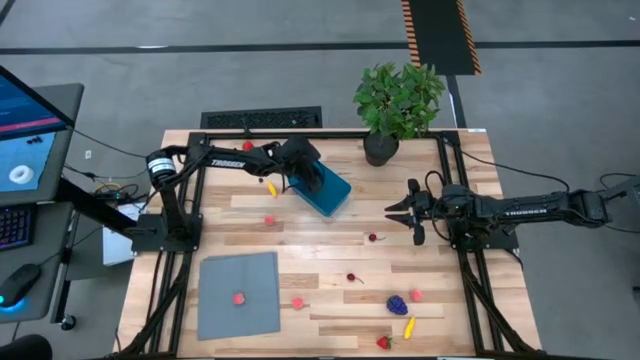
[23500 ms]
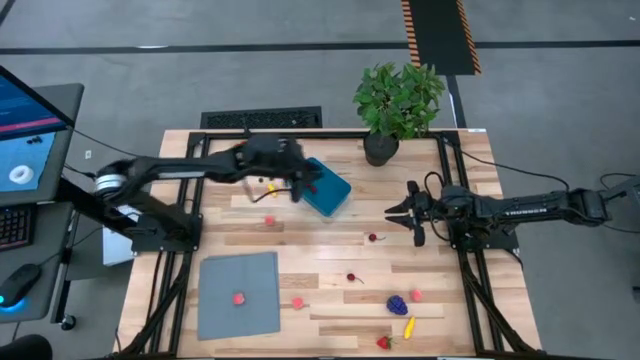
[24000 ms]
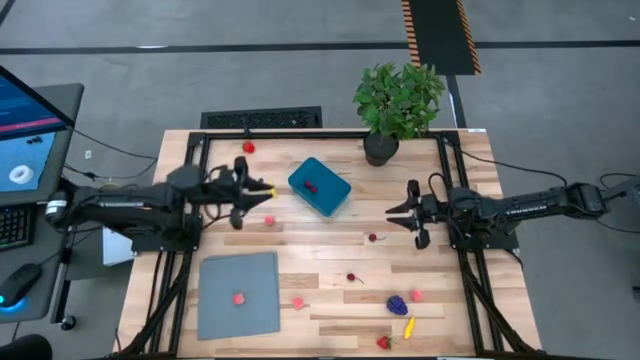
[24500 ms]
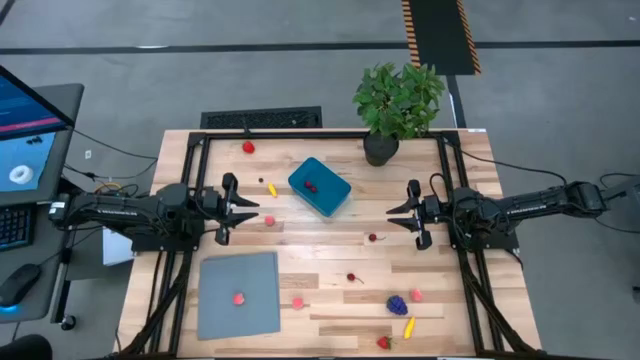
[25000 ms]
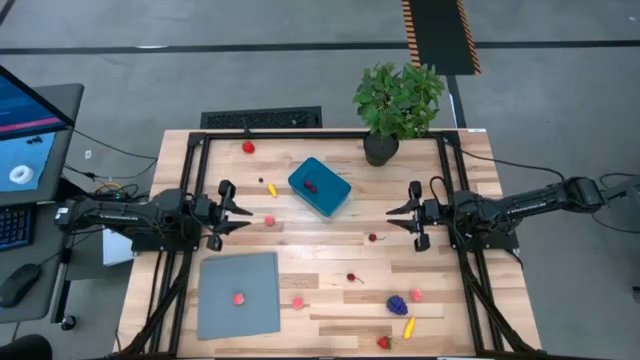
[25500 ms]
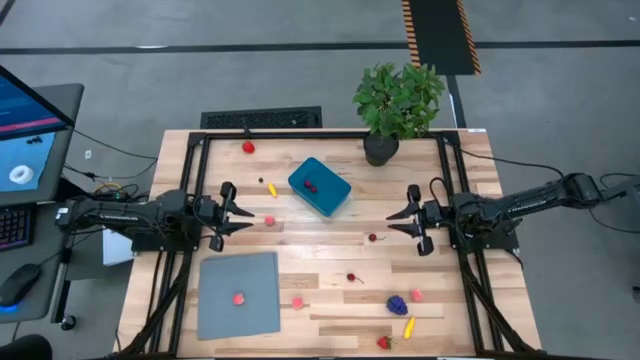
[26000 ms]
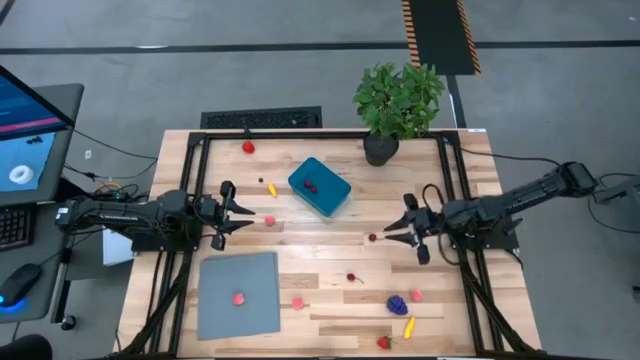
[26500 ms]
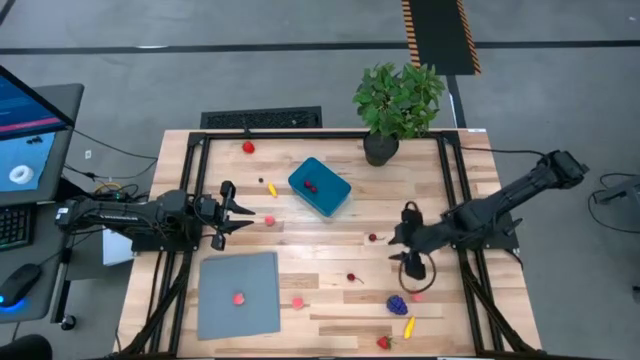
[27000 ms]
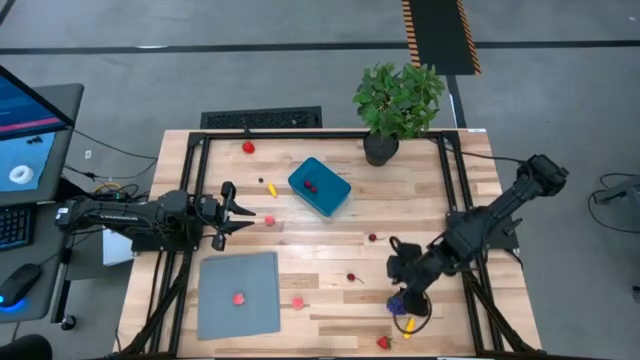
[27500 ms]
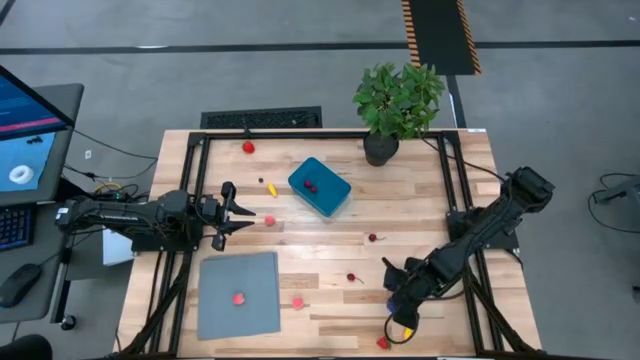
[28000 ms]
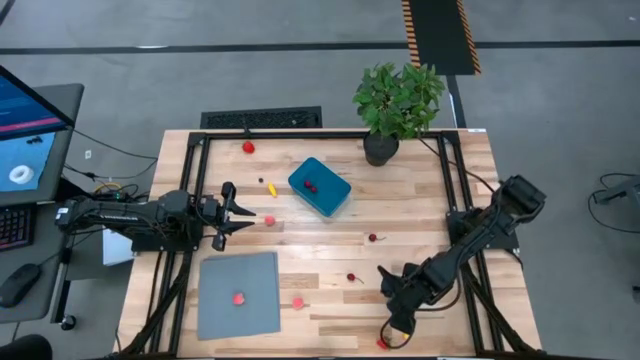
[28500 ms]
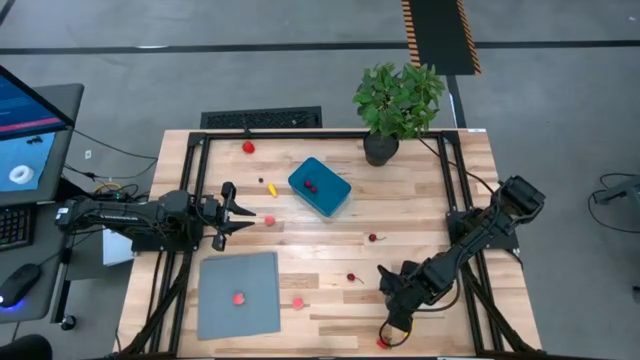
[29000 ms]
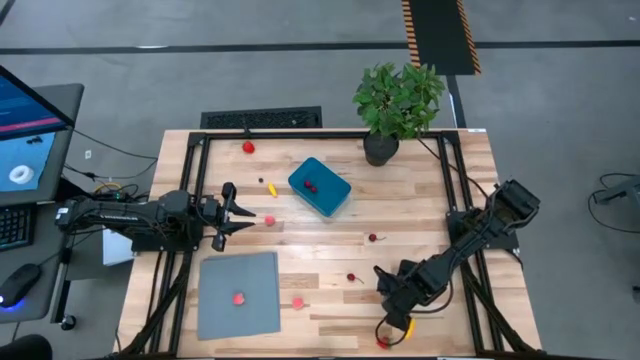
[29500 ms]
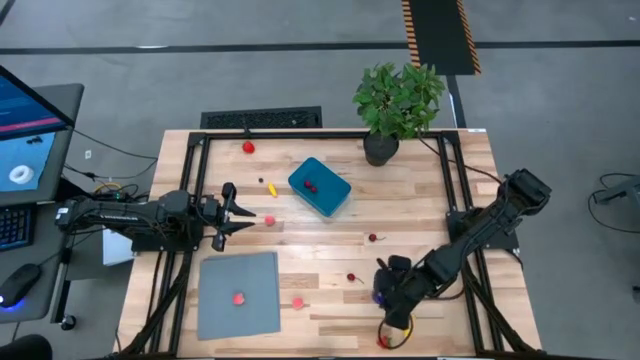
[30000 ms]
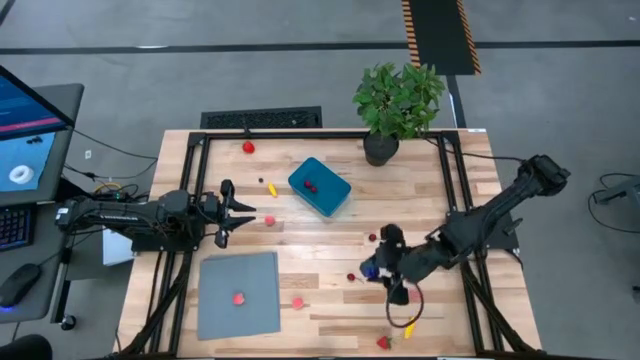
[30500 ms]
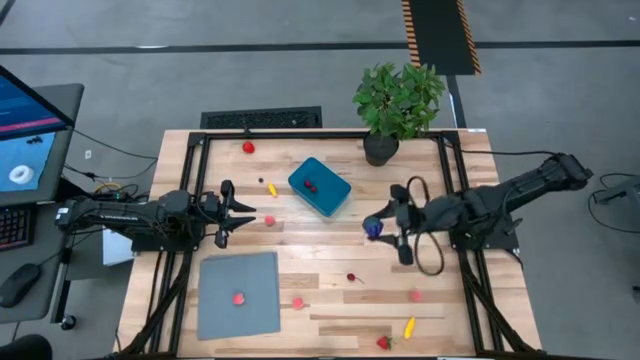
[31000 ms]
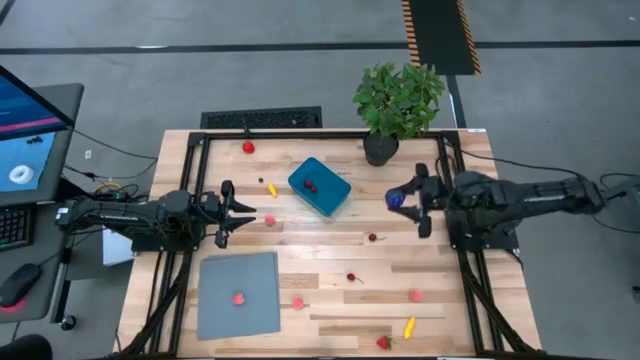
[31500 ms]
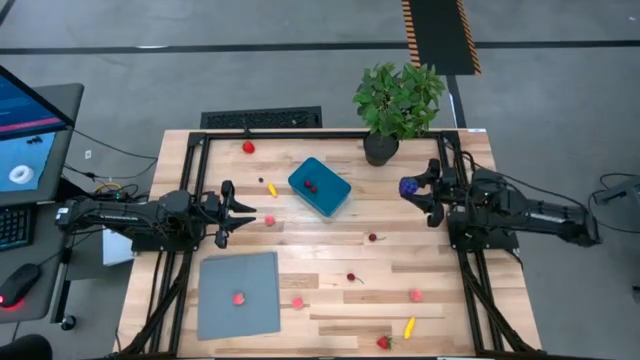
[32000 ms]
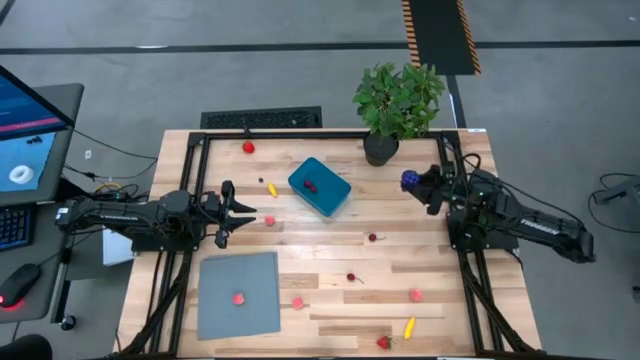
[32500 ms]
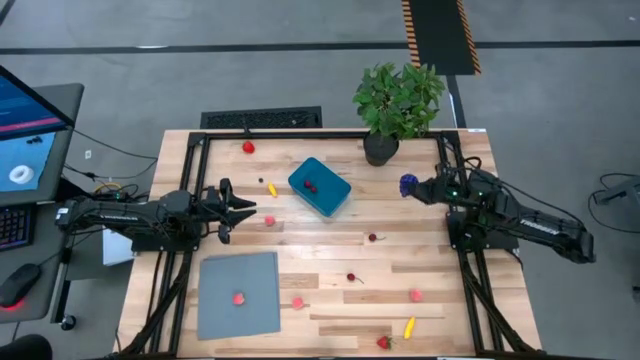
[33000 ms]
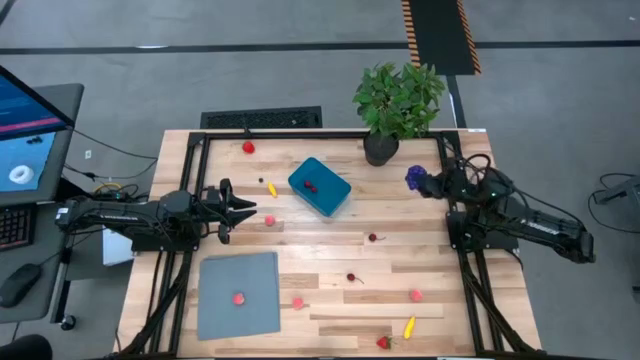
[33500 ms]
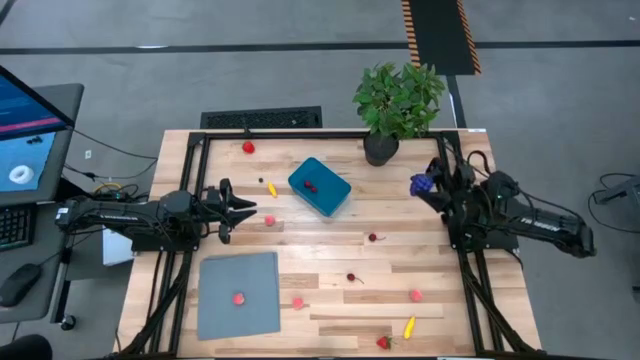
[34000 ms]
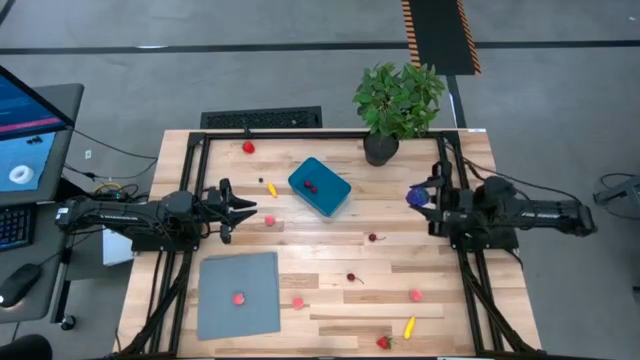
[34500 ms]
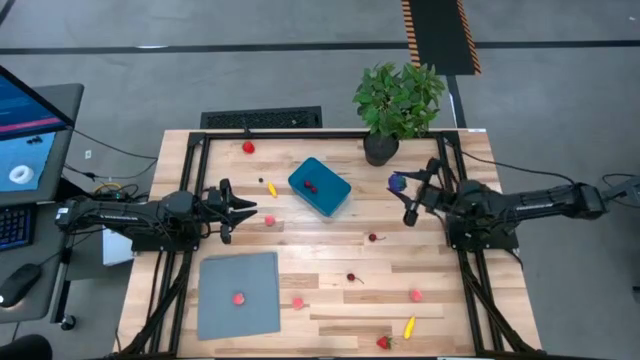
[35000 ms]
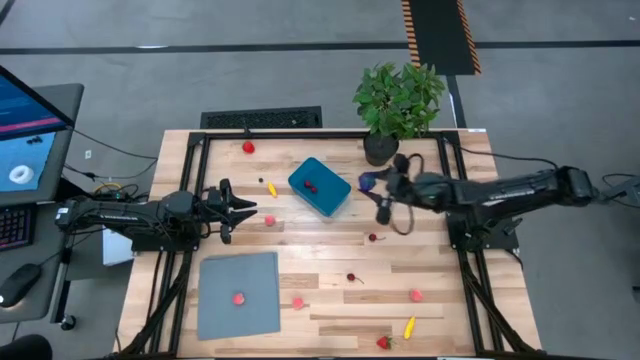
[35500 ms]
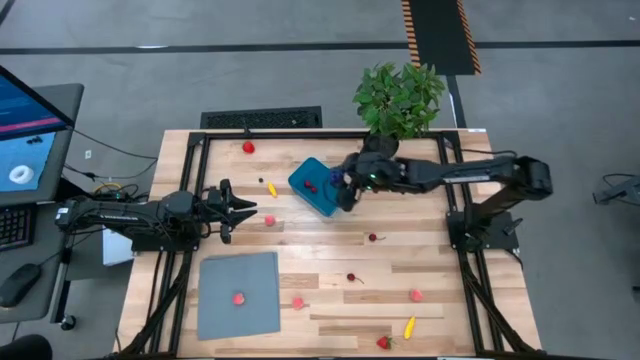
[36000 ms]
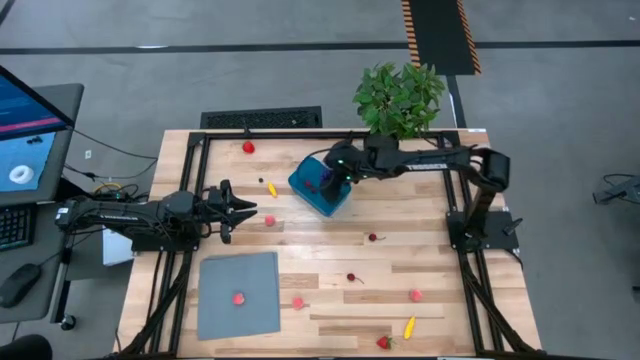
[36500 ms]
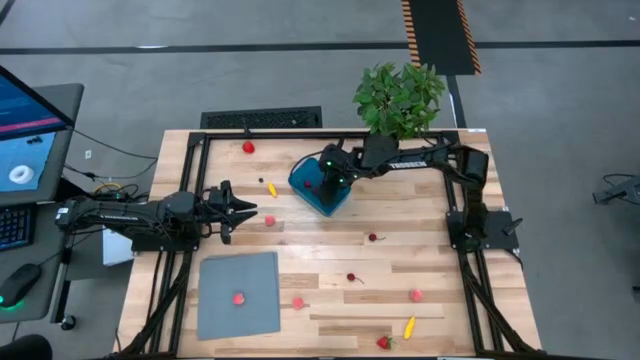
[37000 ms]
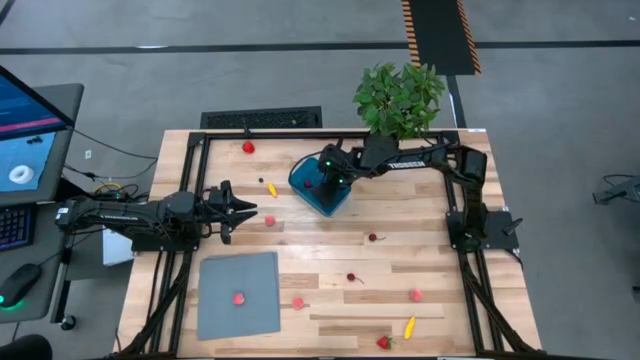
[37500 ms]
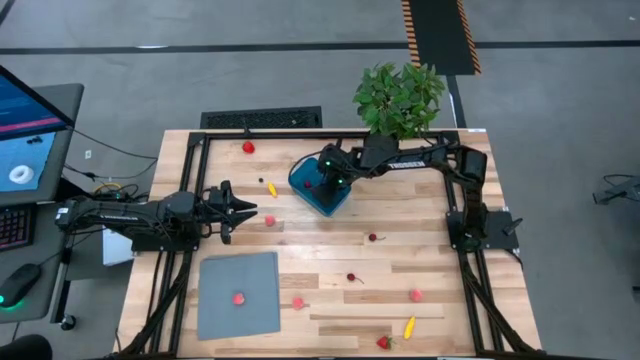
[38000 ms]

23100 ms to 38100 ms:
Task: Pick and placing Produce into tupperware
Put the grapes into the container

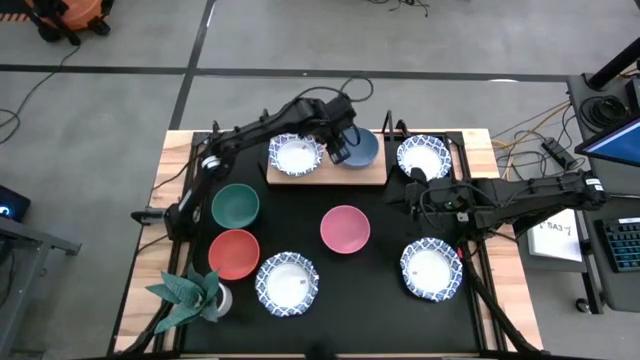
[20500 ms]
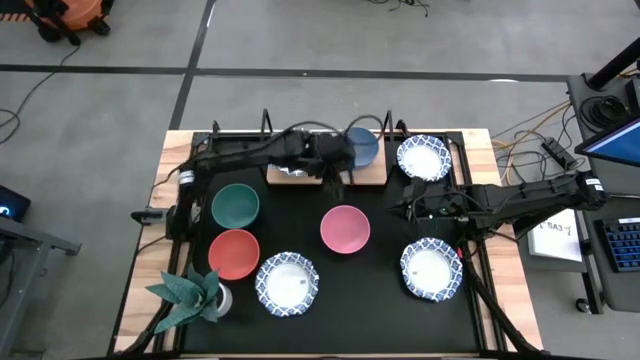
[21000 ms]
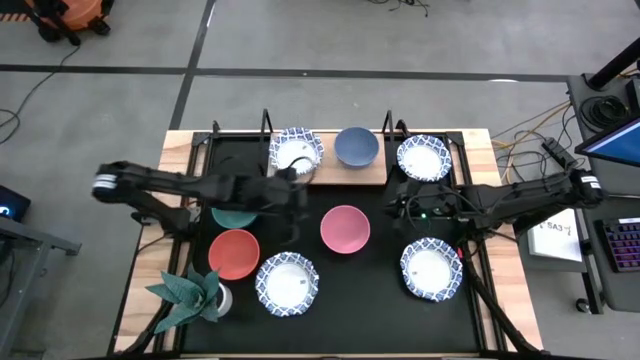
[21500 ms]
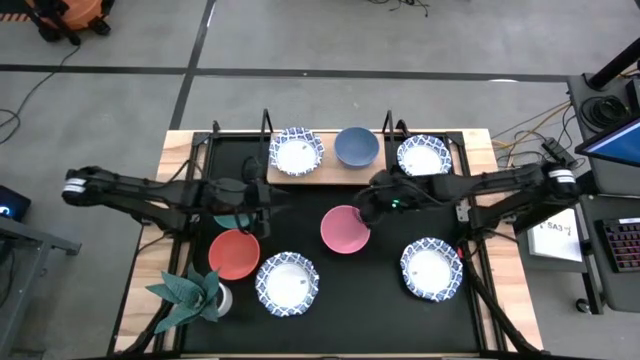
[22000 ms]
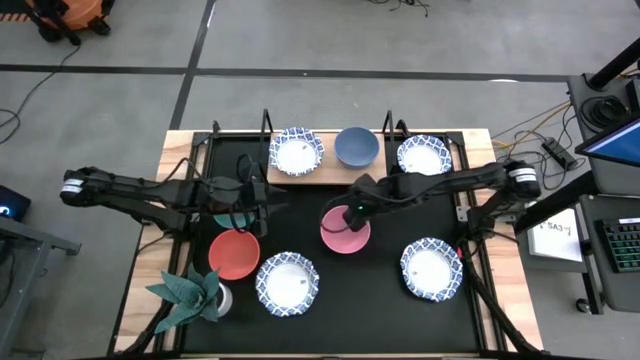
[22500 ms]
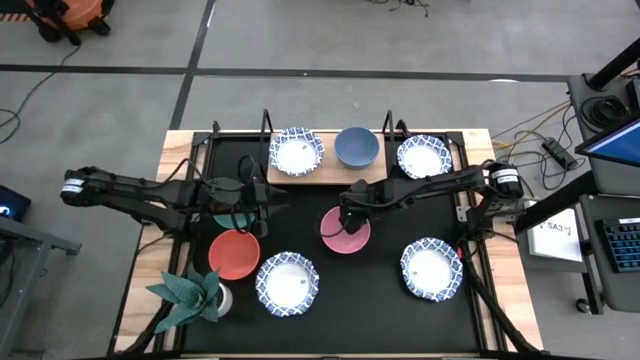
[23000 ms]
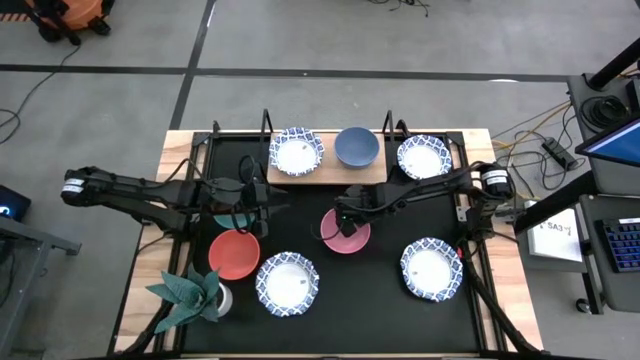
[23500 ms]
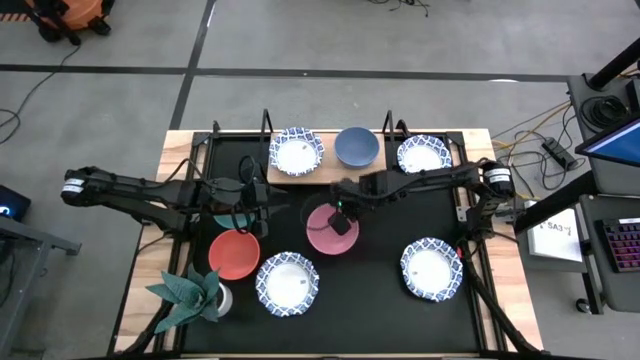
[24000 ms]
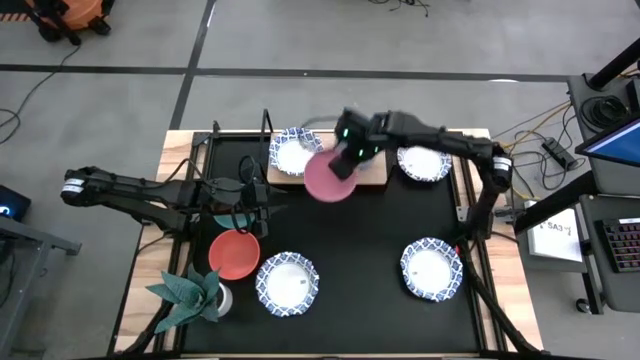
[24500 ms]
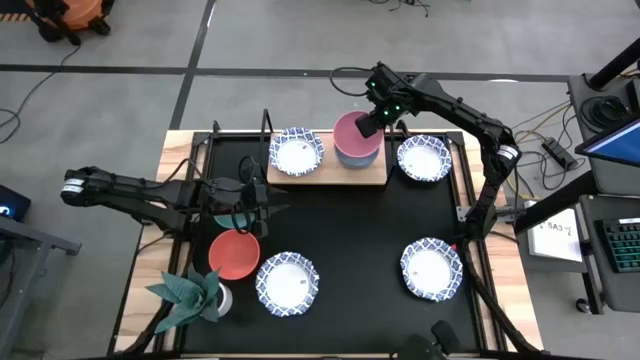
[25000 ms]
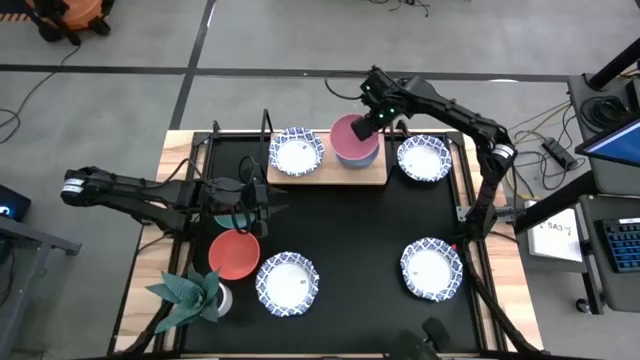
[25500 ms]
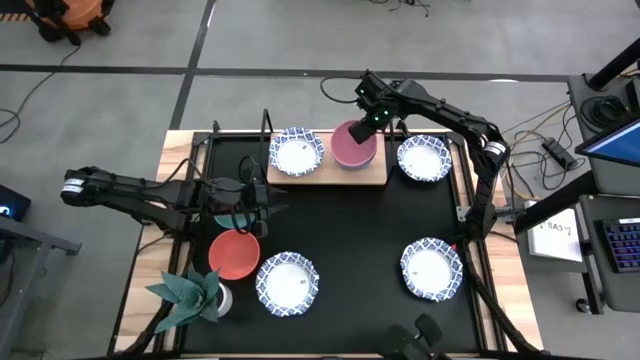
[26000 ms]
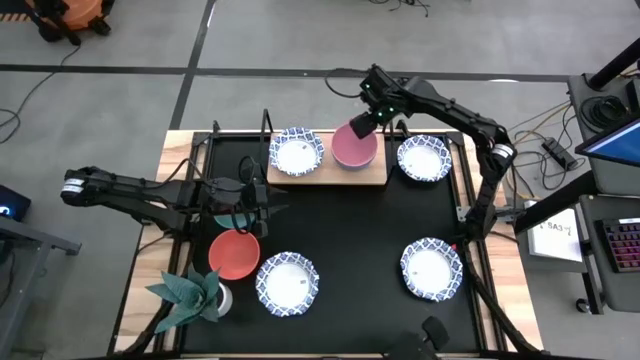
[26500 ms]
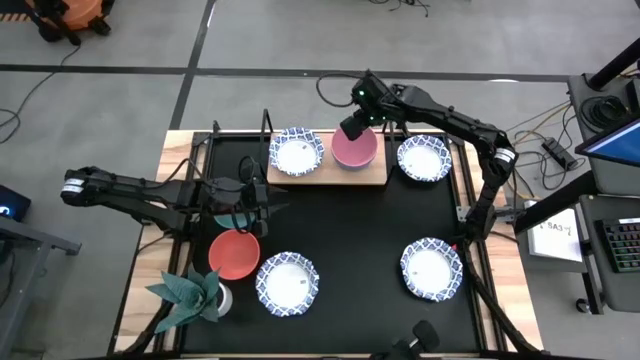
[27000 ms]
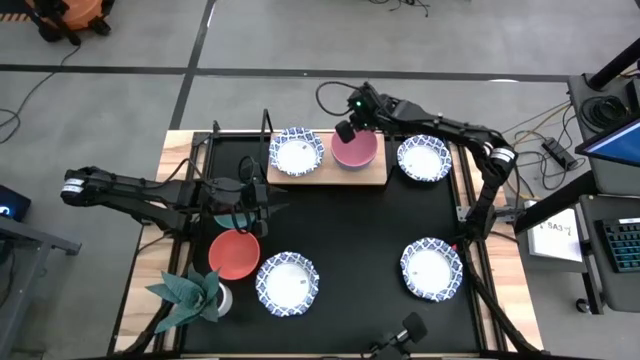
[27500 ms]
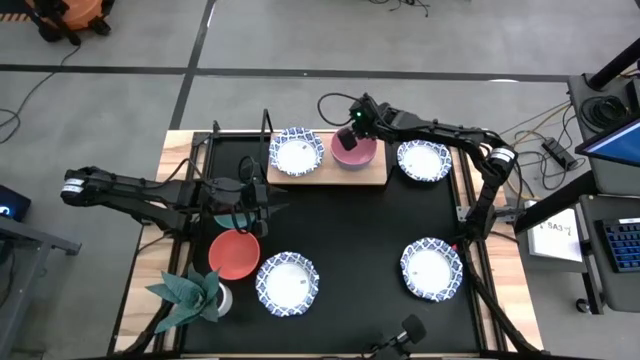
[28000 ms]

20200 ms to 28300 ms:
Task: Place and stack bowls onto a shelf
Stack the pink bowl on top of the blue bowl on the shelf
